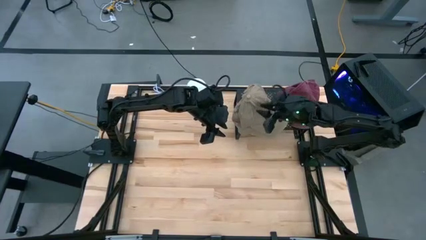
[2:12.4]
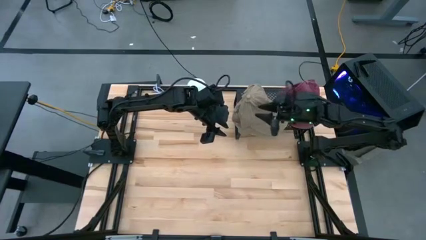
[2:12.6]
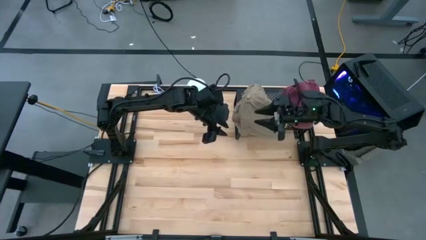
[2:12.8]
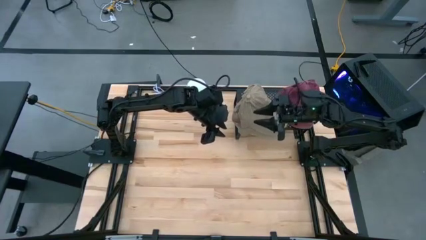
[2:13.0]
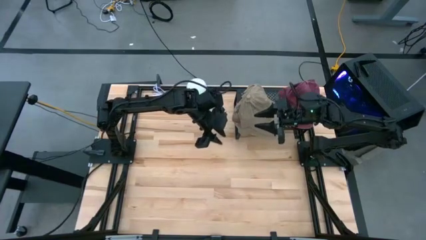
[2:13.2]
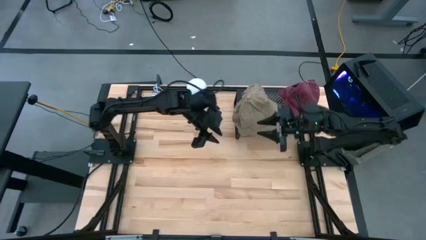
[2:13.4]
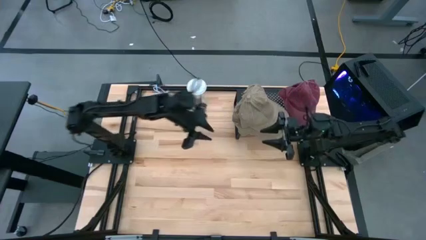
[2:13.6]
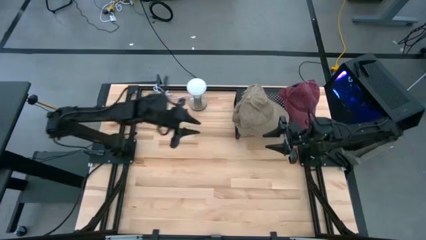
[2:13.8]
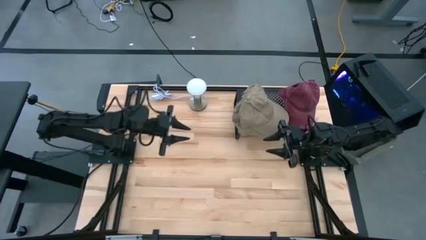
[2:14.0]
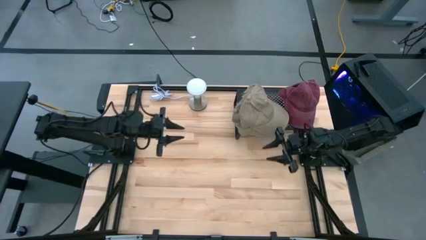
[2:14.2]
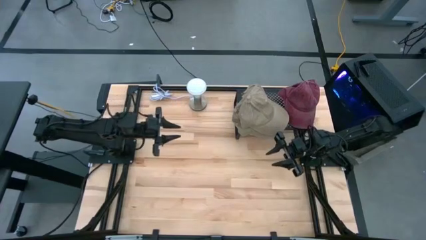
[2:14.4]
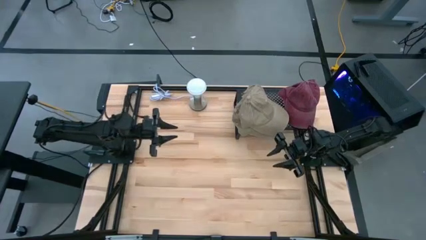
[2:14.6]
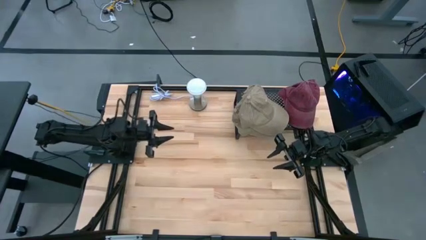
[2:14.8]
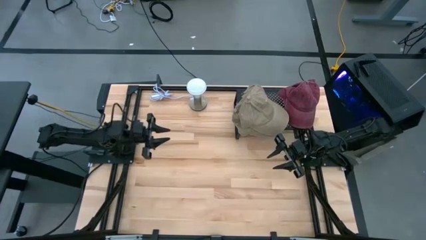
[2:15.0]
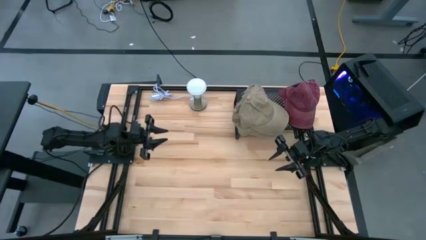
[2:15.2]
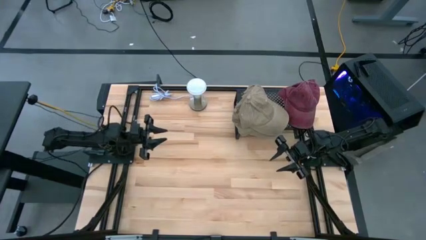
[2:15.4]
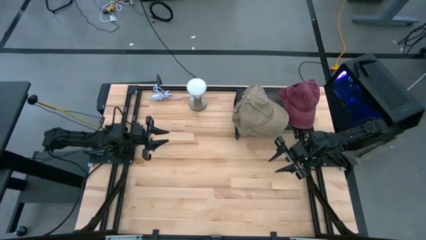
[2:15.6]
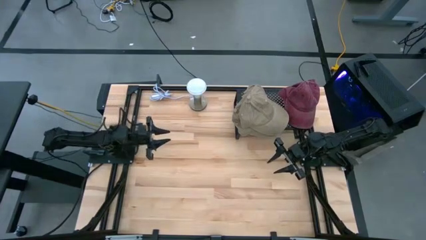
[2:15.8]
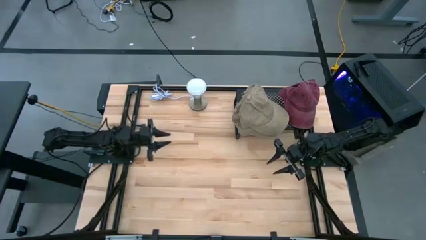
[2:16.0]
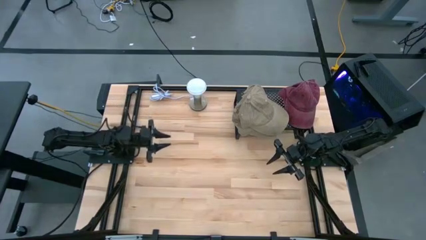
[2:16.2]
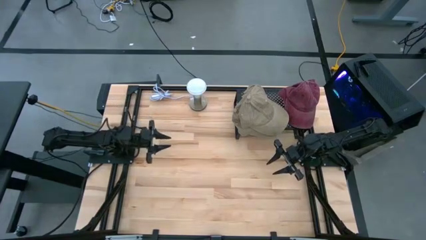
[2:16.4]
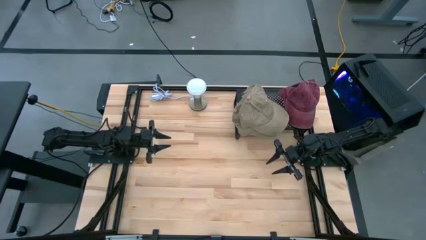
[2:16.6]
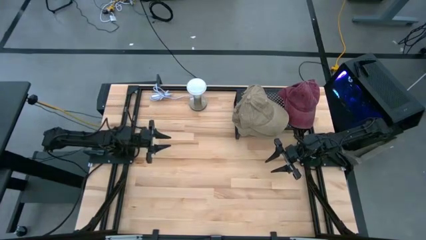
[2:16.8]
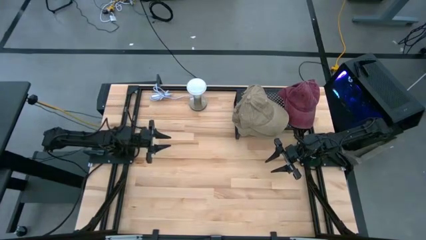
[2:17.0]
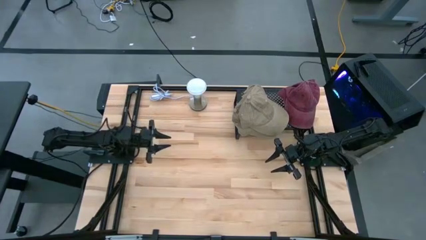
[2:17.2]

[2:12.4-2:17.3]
Task: Pick & Place hat
Return to home position

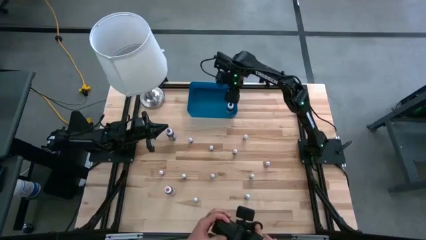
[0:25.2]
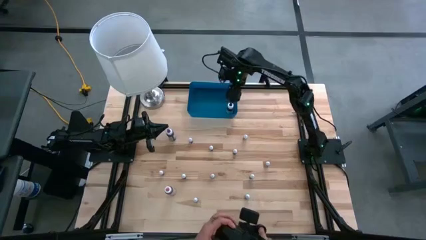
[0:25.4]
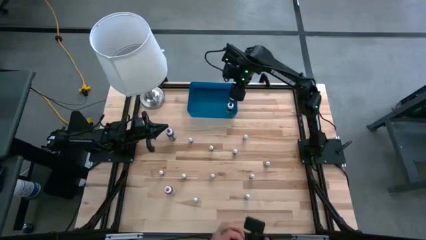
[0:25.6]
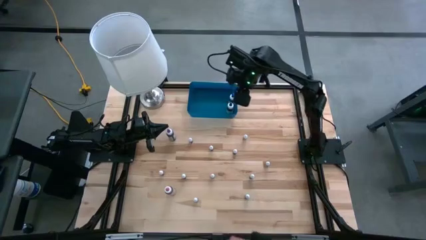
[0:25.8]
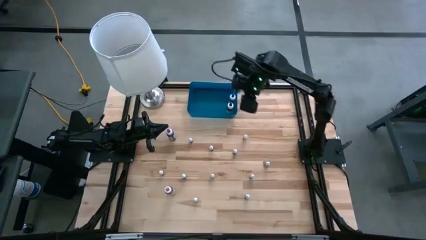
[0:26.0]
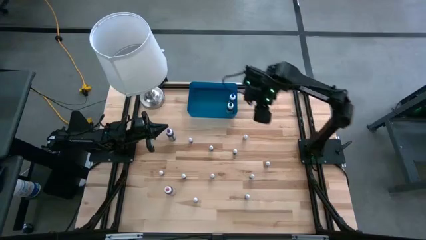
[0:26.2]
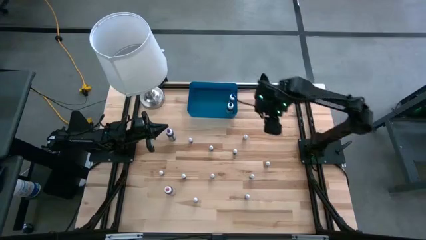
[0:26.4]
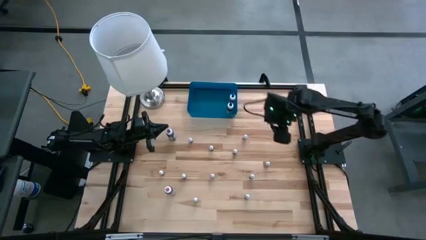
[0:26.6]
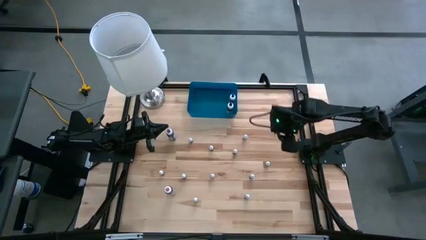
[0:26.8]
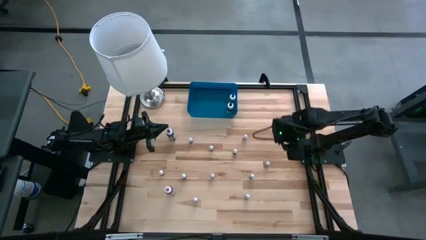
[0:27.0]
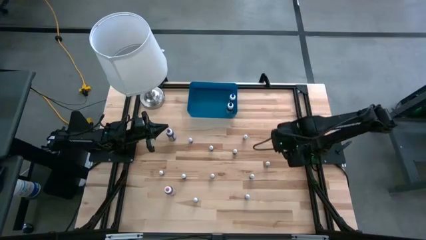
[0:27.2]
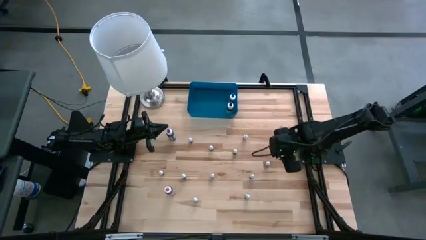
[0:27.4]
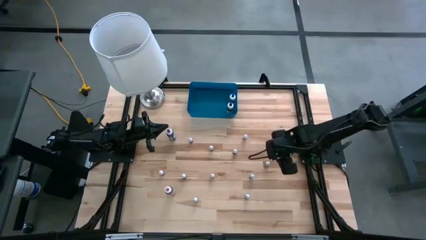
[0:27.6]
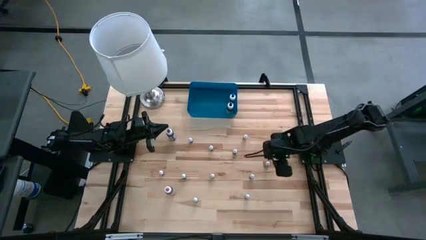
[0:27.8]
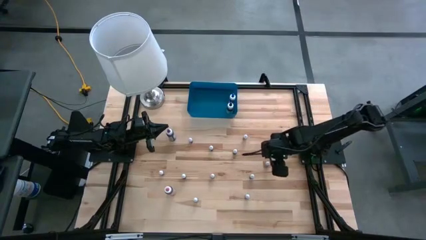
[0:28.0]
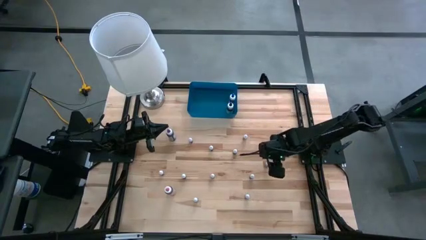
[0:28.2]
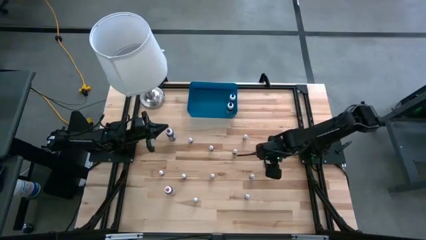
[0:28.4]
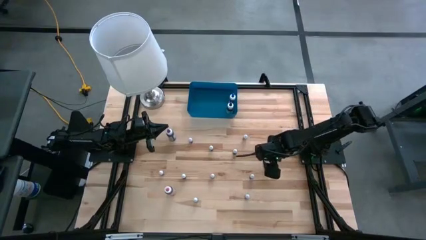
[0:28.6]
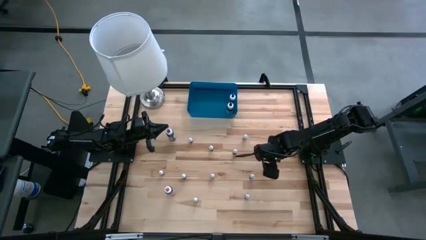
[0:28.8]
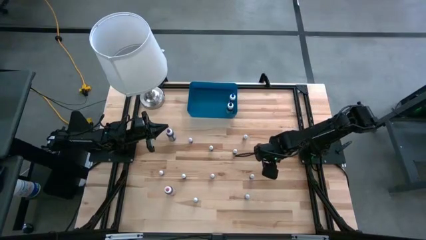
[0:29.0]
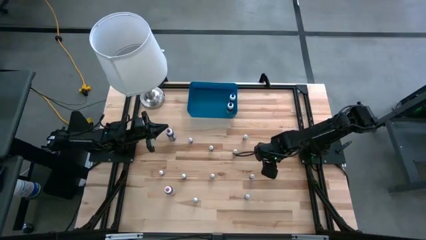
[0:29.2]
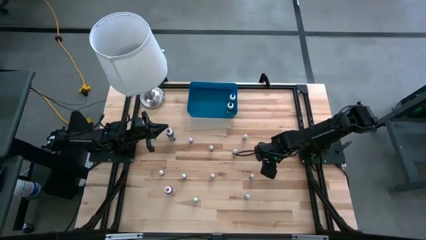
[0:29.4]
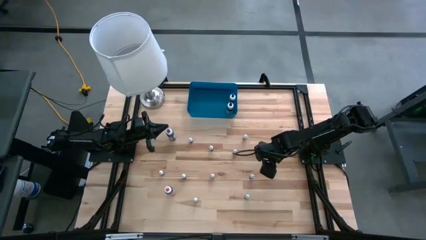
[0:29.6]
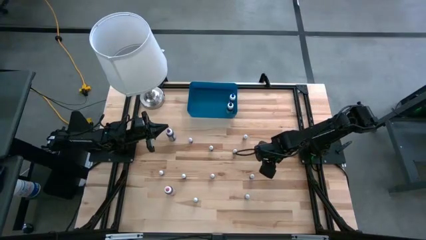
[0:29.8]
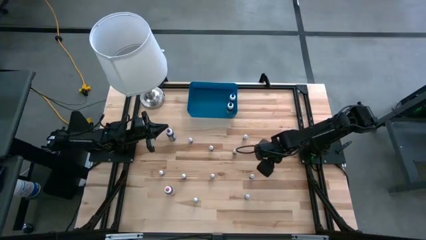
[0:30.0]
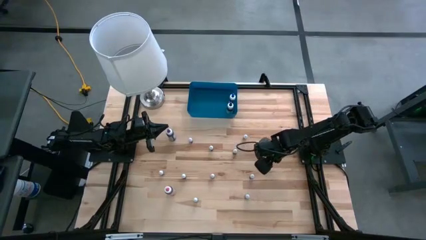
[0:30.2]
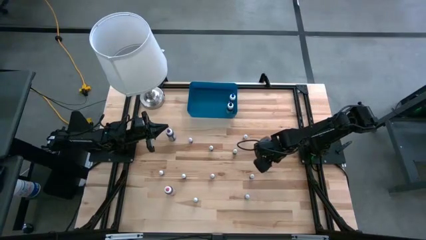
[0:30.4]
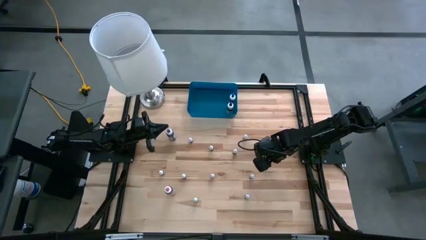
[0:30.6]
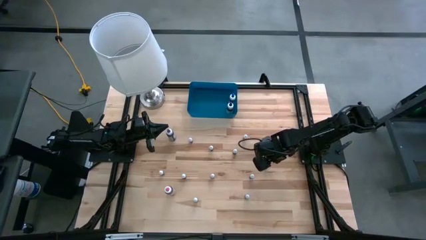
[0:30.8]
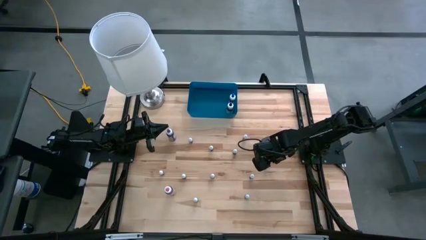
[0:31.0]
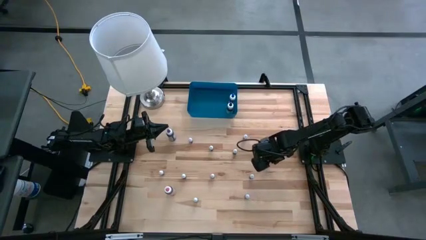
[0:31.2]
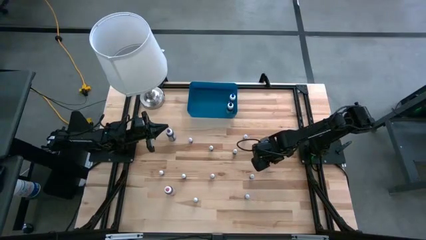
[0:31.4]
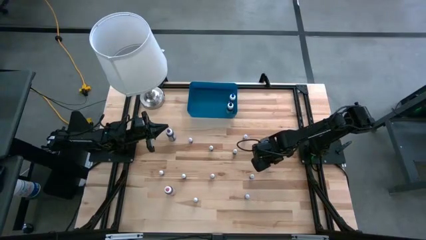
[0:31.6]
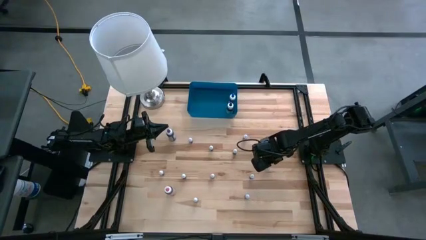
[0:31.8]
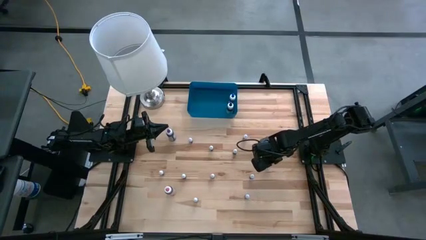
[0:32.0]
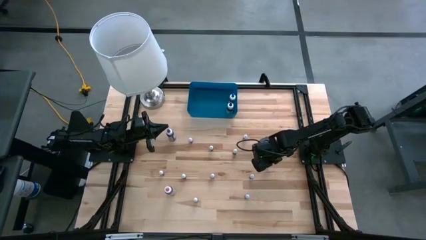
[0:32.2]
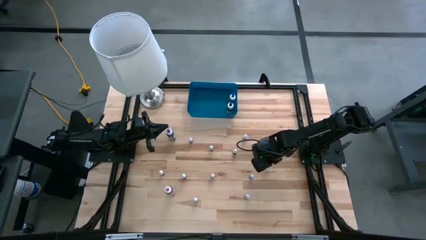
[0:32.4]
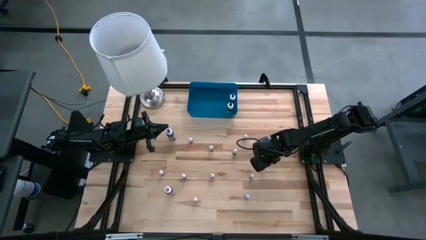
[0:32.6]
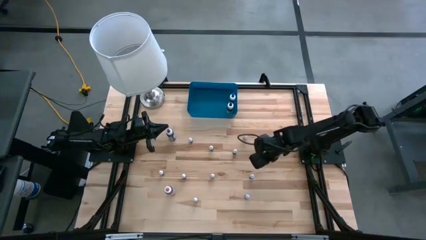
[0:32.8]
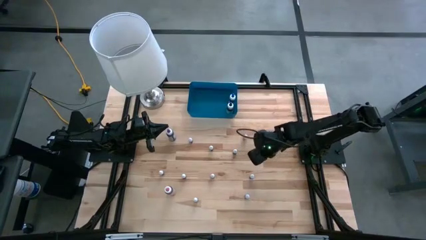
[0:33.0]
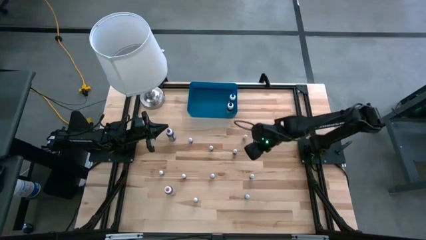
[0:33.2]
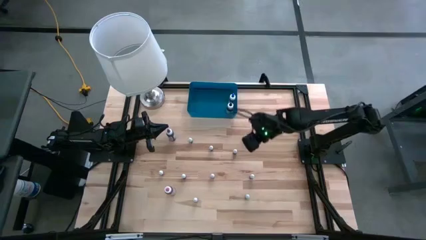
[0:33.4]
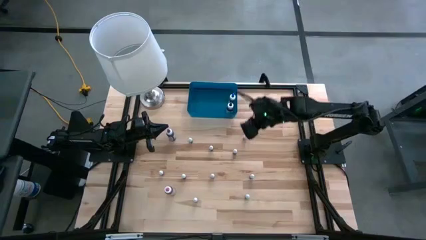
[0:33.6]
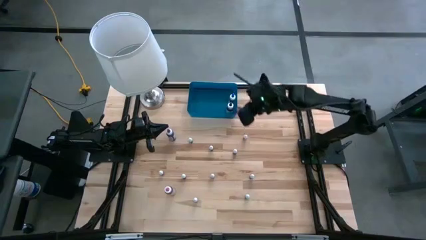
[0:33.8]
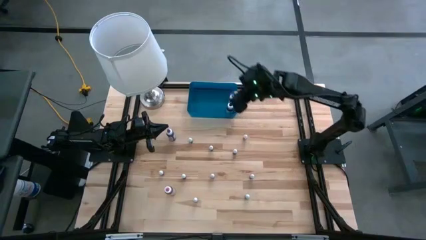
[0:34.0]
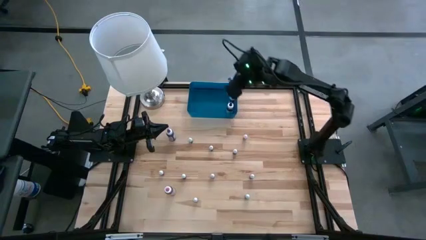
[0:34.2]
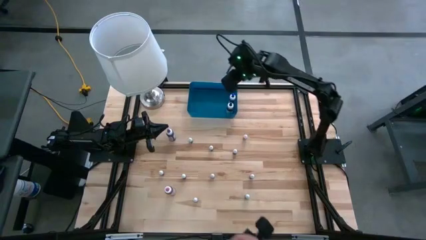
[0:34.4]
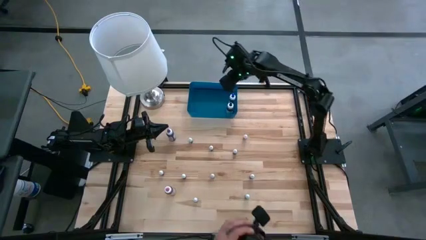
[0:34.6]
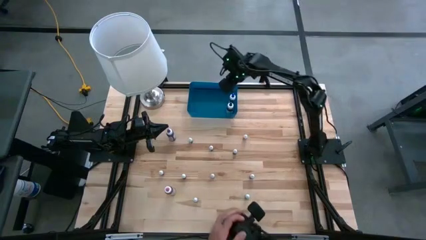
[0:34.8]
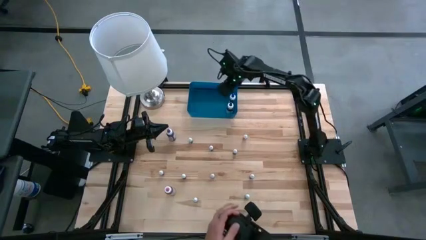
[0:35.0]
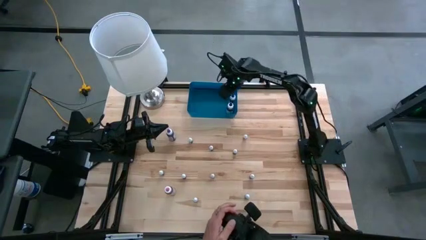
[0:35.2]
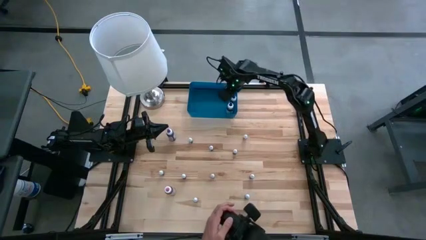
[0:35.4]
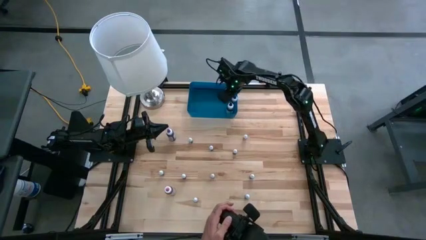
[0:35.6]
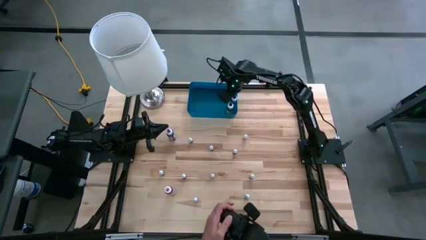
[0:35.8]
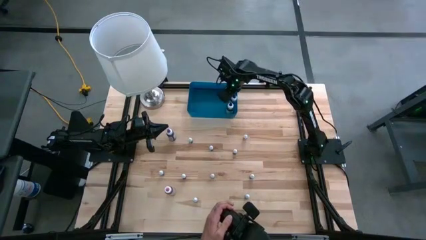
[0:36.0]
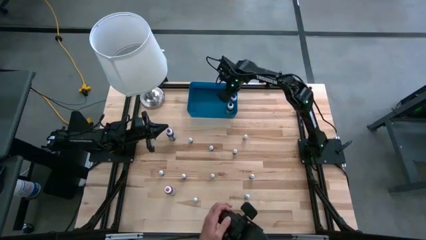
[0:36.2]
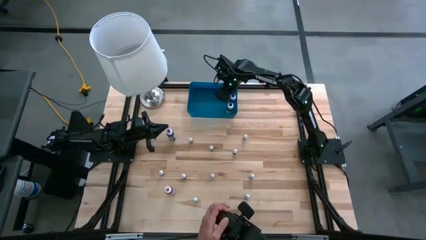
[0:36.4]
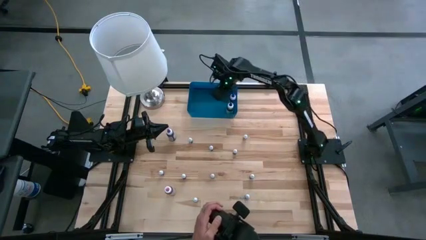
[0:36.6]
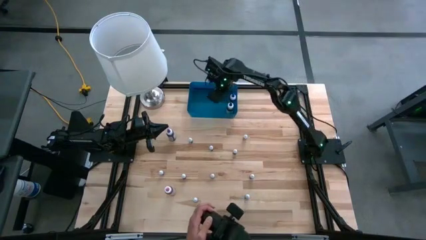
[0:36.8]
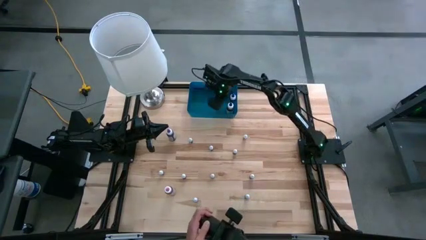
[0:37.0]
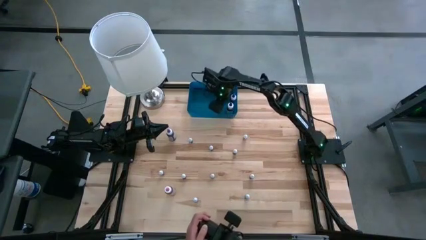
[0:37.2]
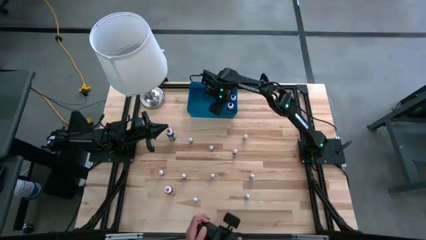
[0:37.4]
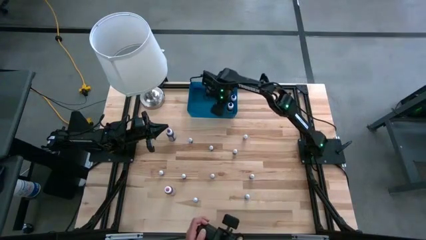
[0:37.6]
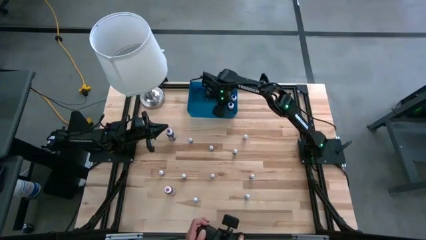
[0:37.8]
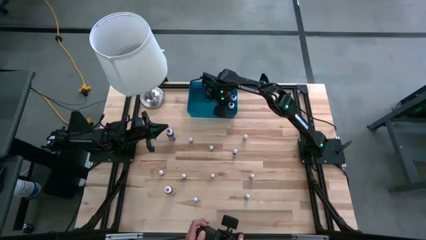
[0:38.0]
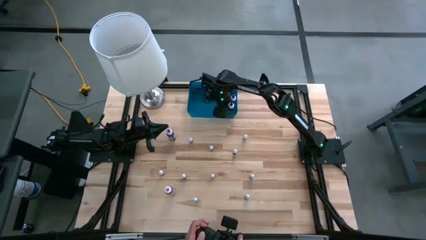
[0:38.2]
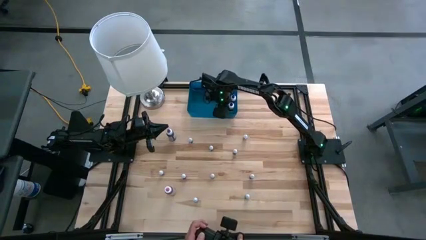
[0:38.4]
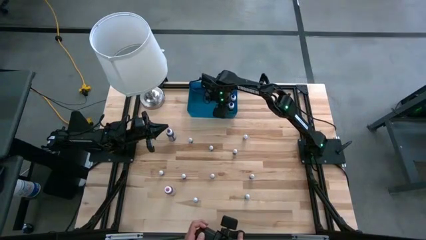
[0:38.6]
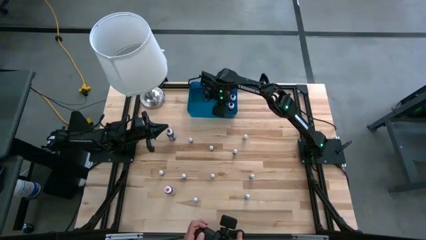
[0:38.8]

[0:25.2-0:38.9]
Task: Pick & Place food coloring
Put the small violet food coloring bottle into the blue bin
